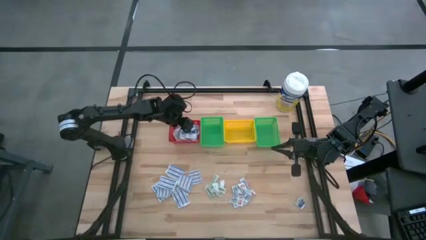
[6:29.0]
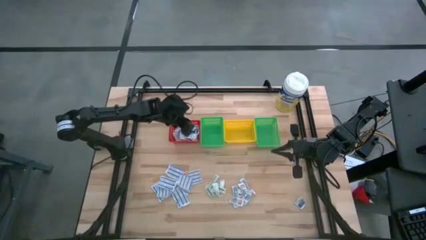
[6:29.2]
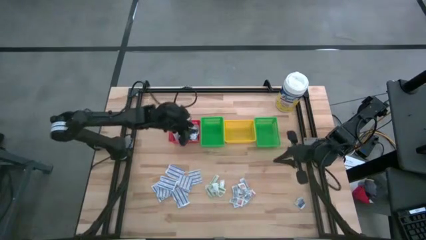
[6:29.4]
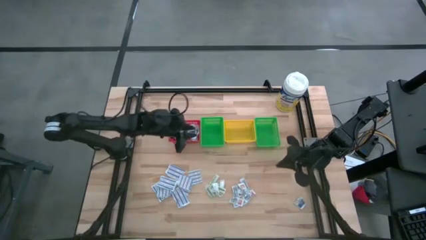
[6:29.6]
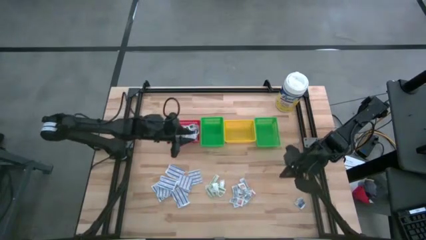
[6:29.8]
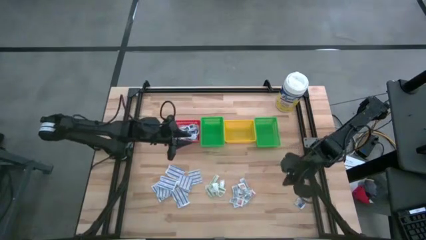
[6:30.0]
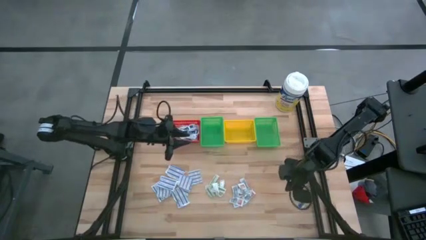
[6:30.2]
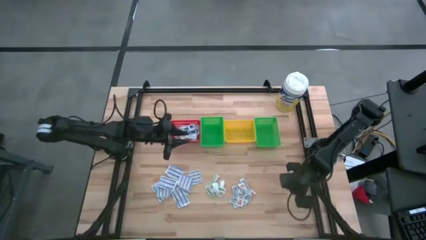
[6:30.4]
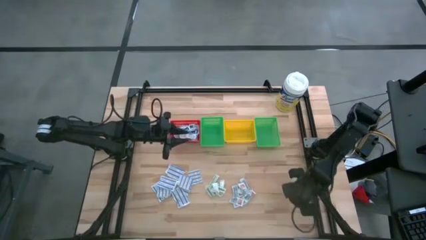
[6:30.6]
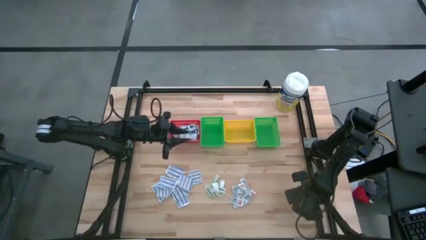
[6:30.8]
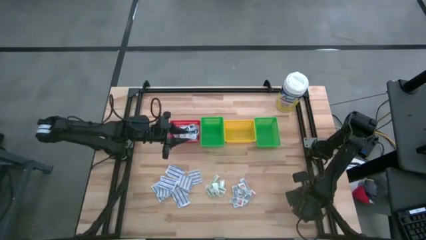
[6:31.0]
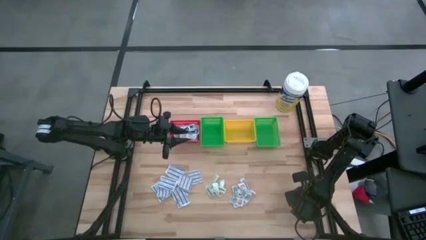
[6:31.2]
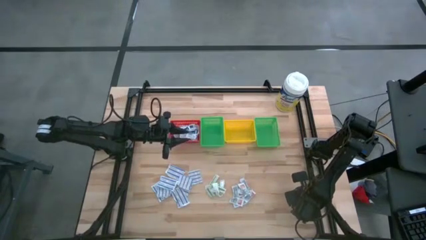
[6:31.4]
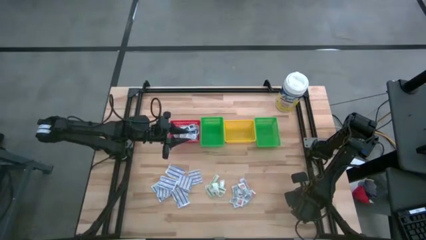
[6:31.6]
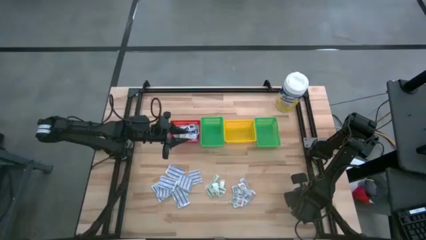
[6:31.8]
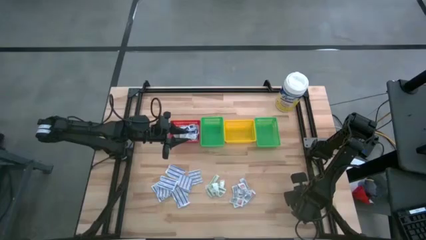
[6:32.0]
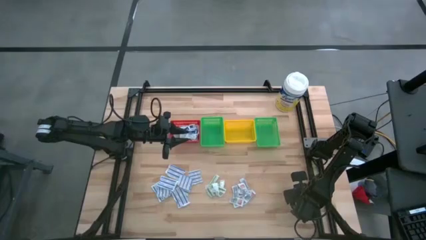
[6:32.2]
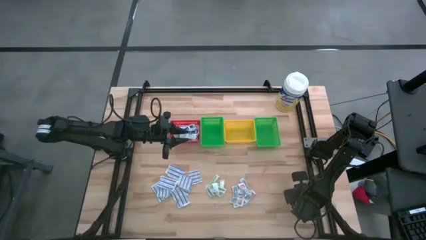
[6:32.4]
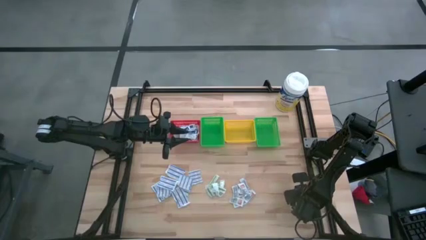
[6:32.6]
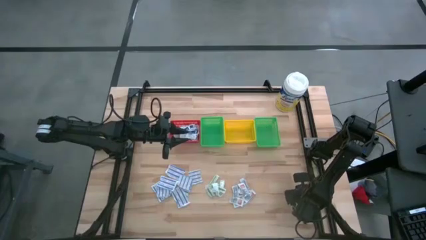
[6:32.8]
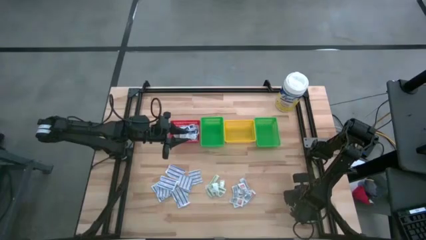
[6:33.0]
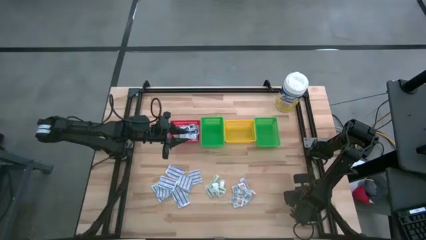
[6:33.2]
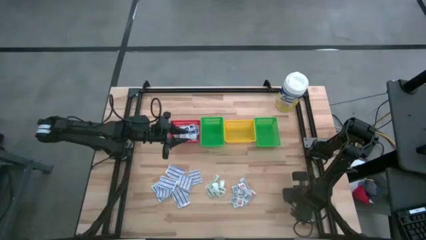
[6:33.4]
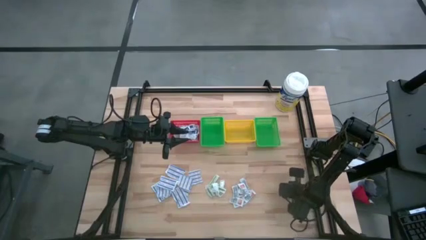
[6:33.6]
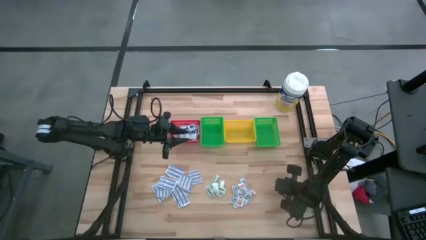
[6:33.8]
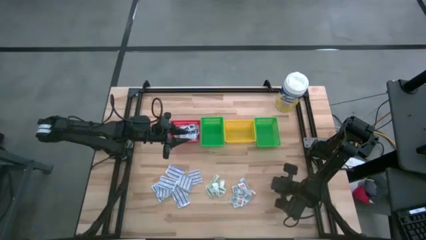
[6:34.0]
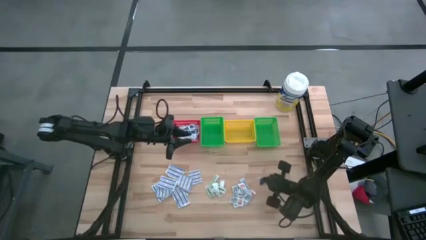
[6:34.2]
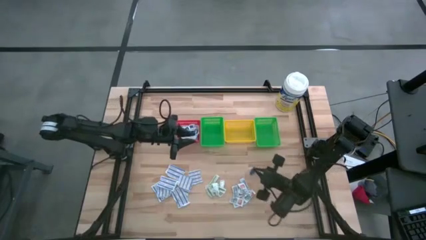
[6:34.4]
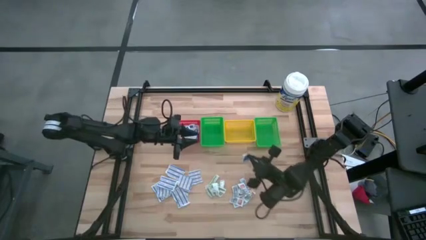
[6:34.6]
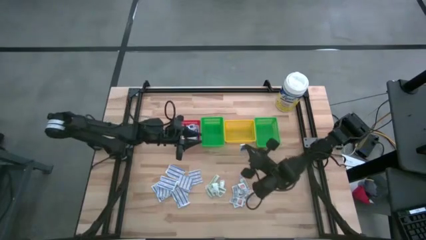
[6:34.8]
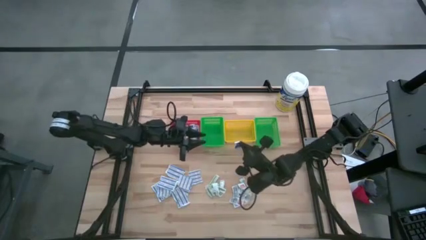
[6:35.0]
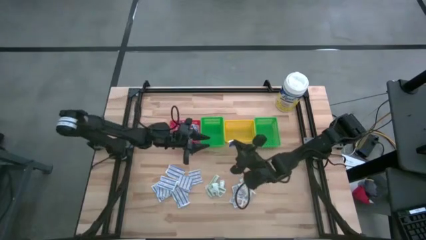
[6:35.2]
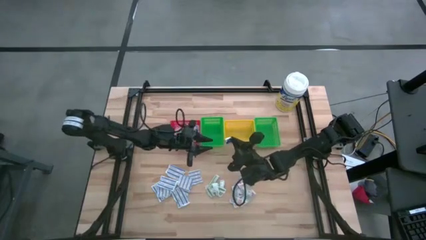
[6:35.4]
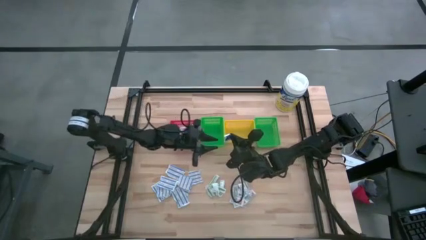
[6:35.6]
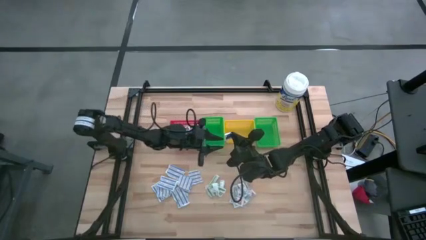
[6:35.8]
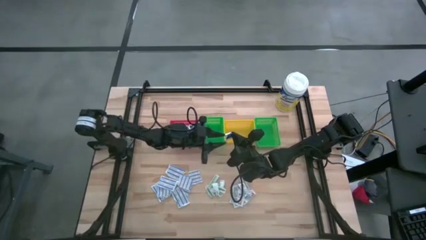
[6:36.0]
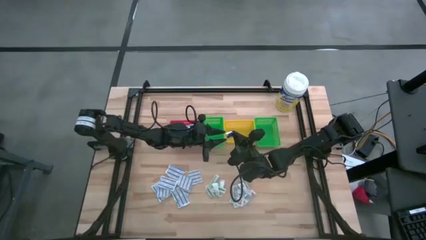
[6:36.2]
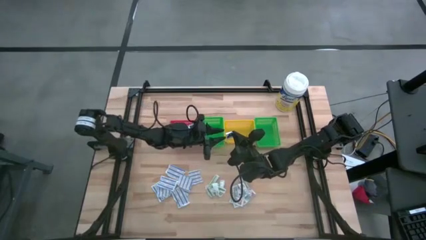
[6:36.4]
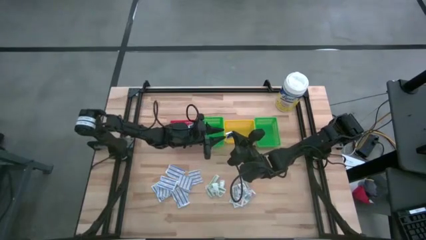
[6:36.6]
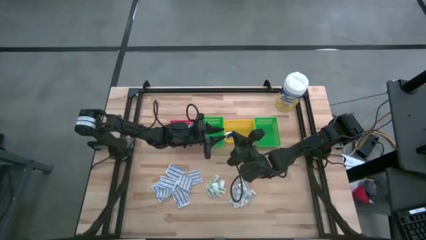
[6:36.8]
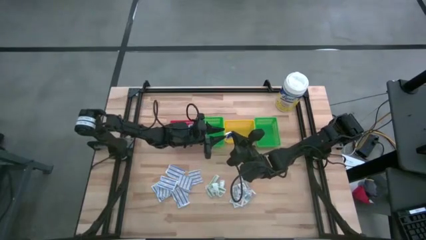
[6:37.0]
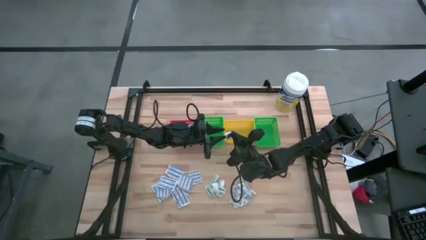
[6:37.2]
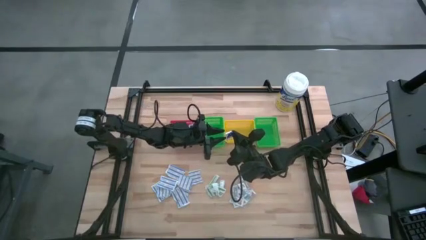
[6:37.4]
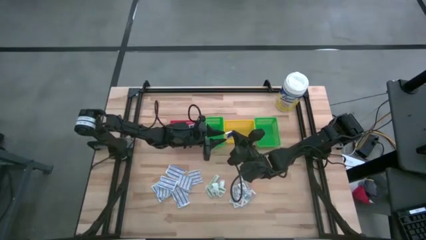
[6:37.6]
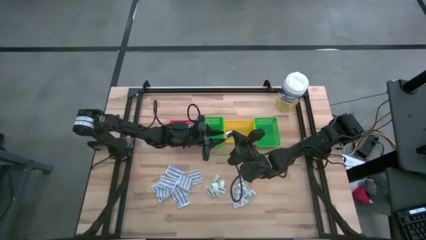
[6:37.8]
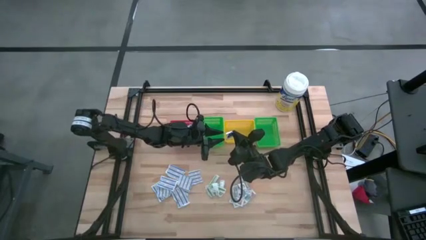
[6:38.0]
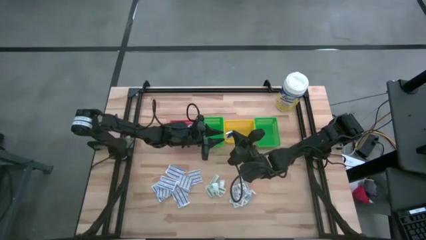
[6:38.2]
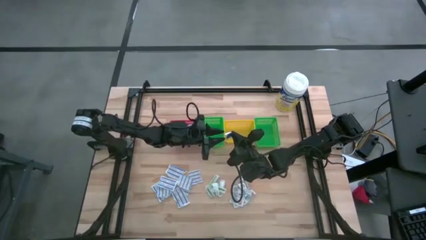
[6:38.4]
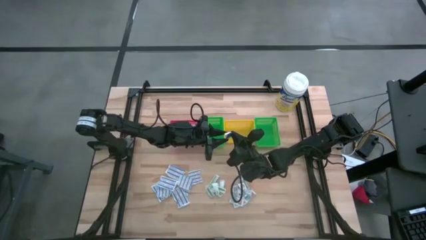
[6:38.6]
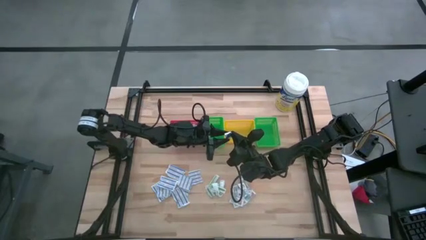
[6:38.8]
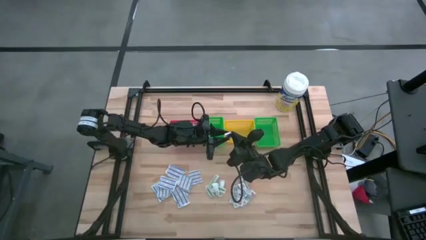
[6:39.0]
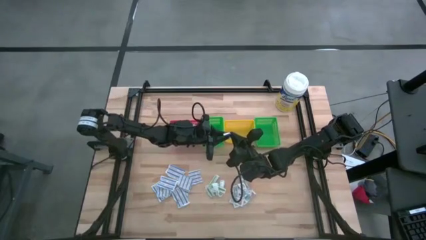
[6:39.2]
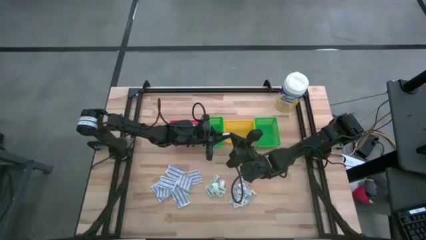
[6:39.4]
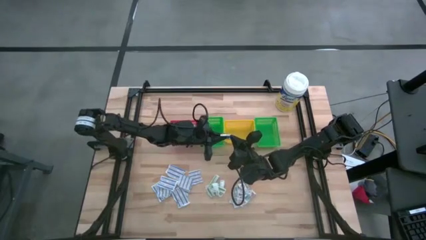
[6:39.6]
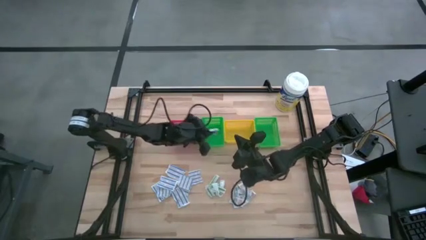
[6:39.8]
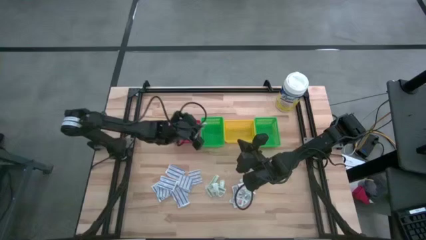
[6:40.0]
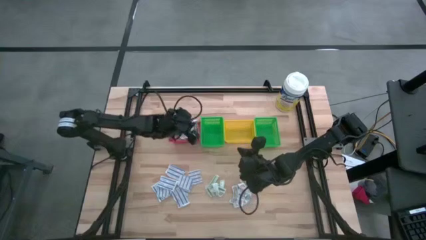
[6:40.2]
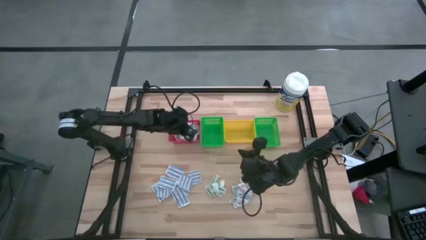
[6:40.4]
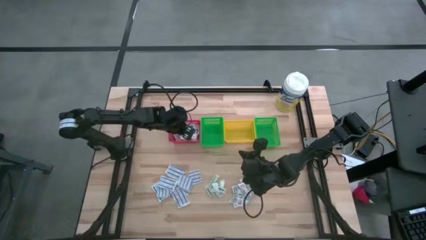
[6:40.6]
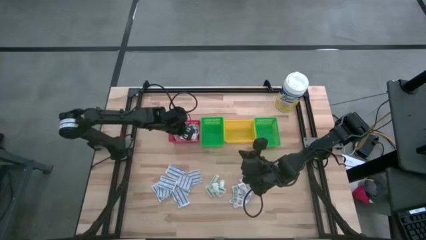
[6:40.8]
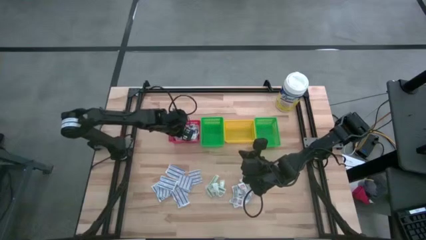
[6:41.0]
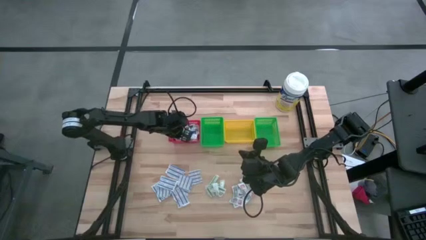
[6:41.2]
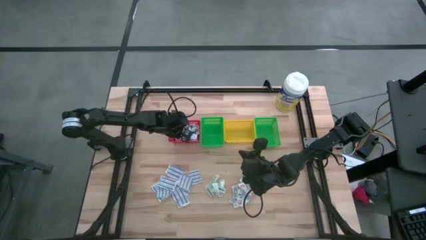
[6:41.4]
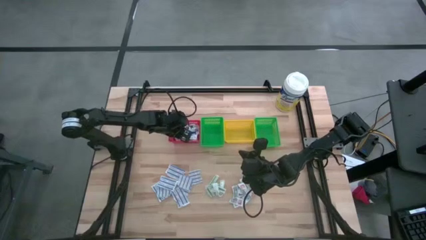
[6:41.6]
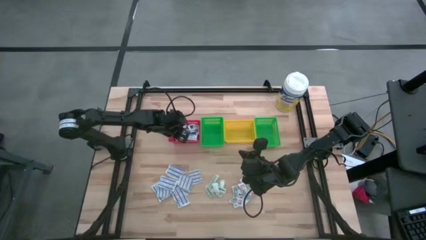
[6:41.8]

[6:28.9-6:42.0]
Task: Pick & Place First Aid Supplies
Put the alcohol pad into the red basket

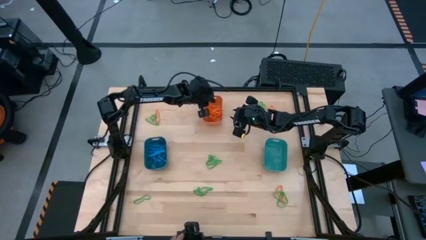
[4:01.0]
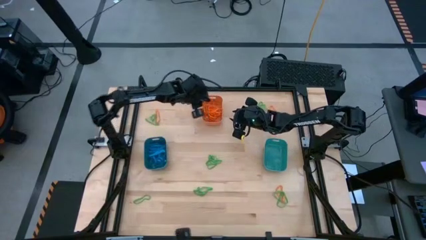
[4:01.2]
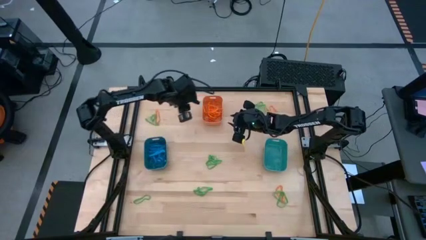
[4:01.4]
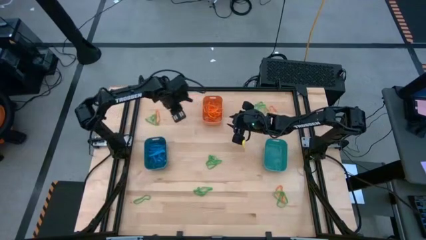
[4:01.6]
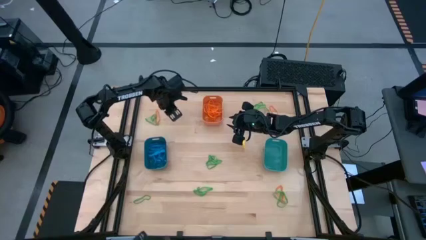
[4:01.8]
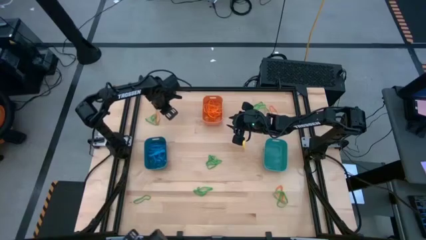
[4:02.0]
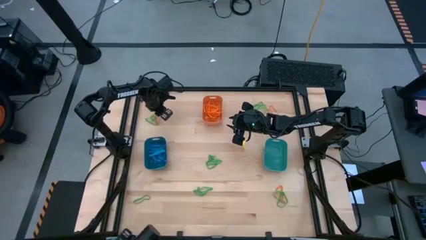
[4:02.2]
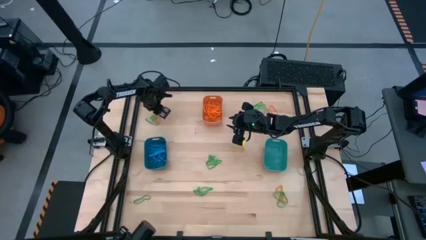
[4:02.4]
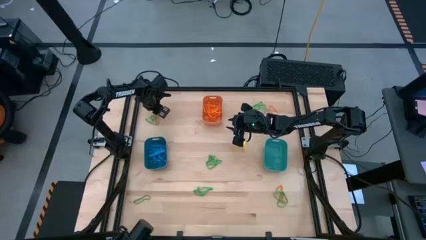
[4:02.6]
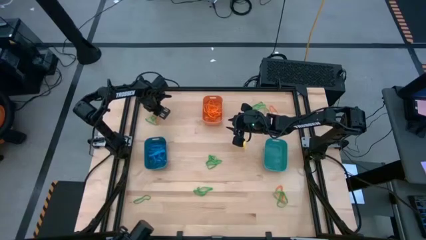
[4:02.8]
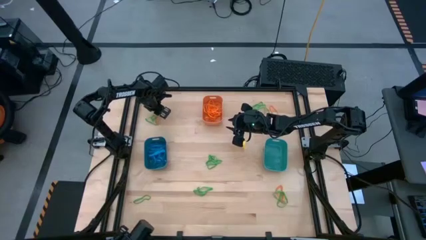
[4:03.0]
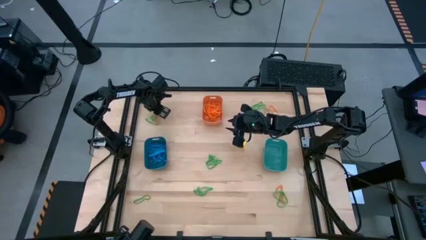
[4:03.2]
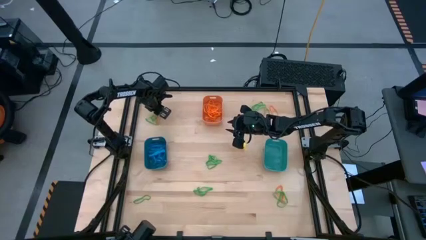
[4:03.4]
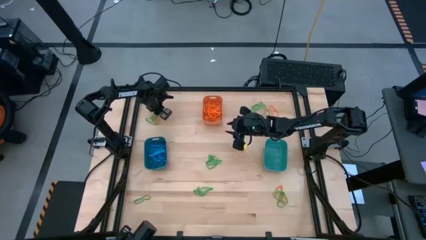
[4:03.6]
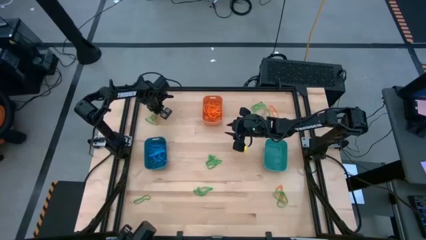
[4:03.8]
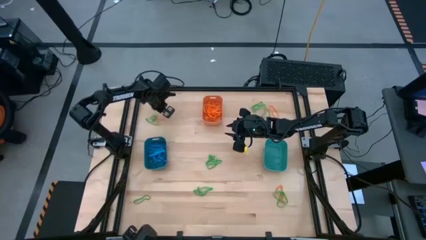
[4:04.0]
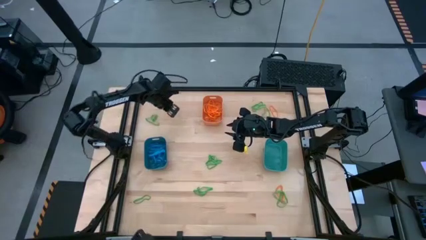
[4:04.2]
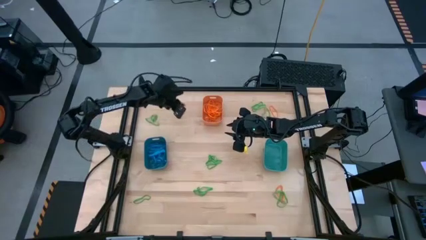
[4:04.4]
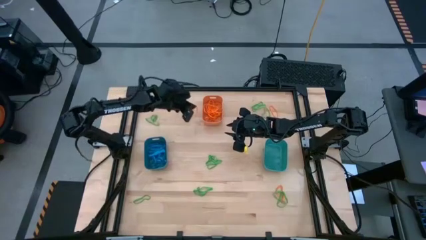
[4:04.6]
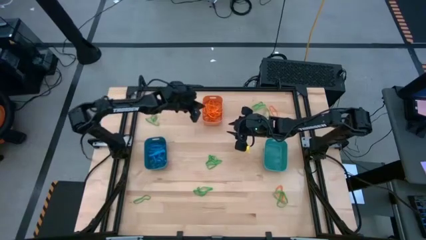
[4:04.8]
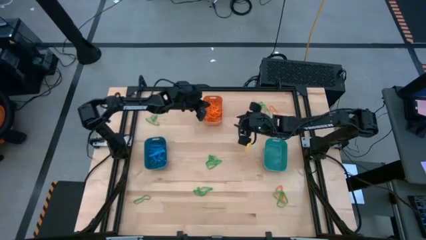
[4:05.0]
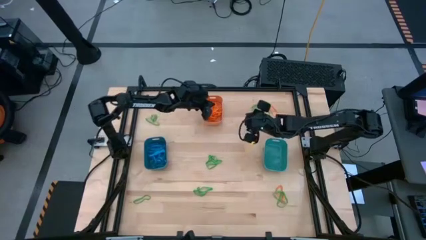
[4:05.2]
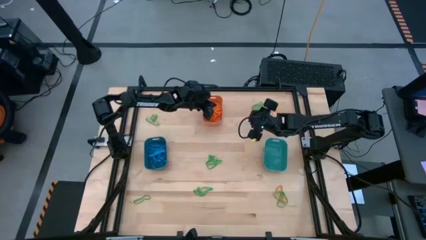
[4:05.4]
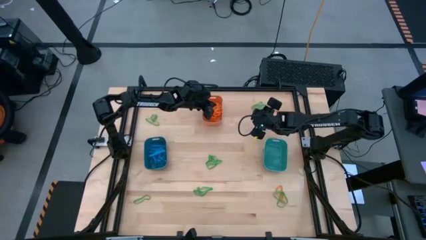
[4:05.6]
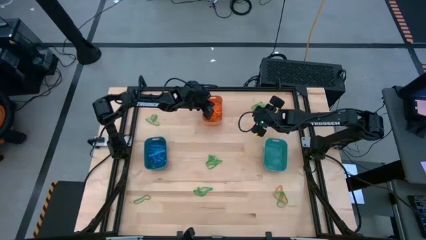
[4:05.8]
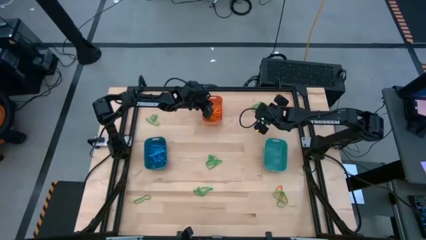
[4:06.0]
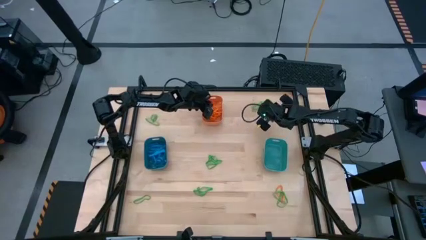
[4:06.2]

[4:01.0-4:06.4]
Task: Sort rubber bands into baskets
Put the orange rubber band into the orange bin
